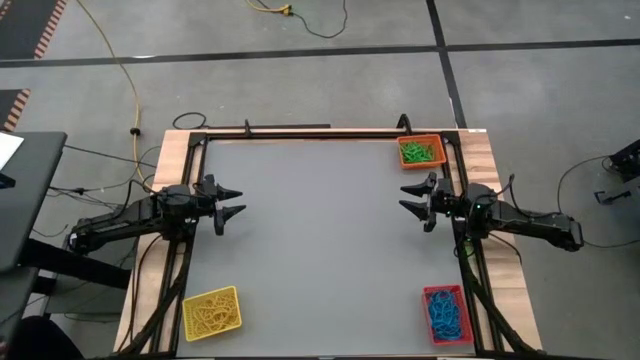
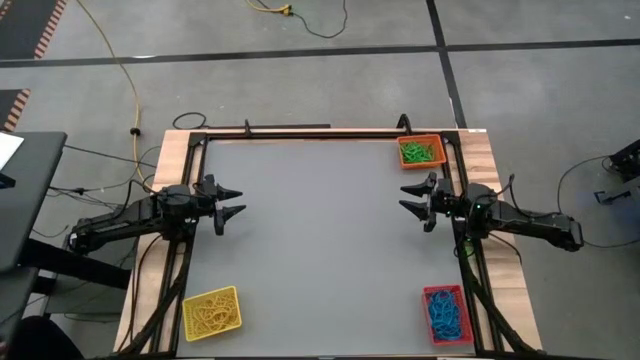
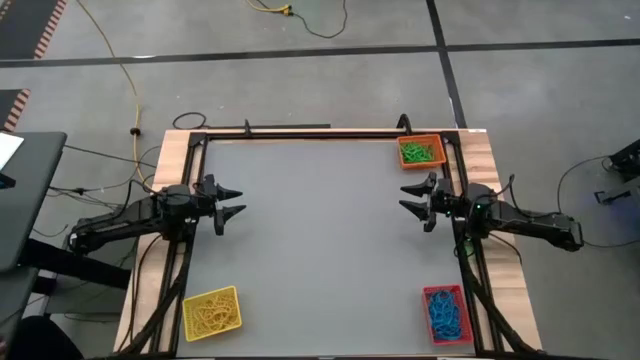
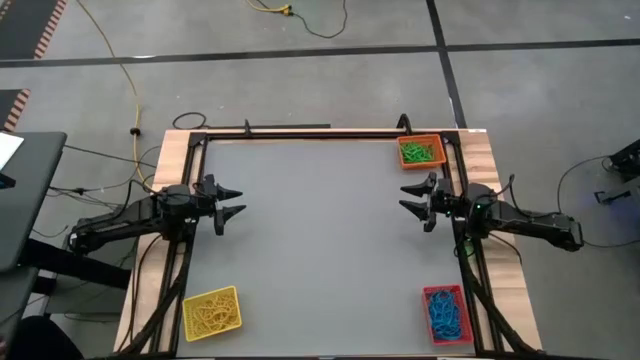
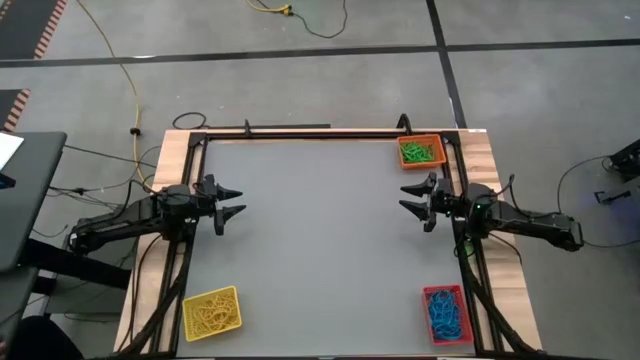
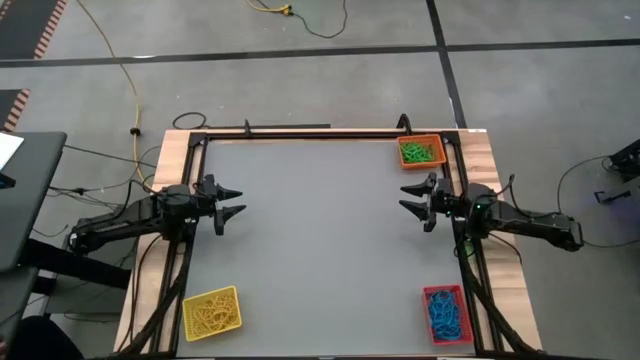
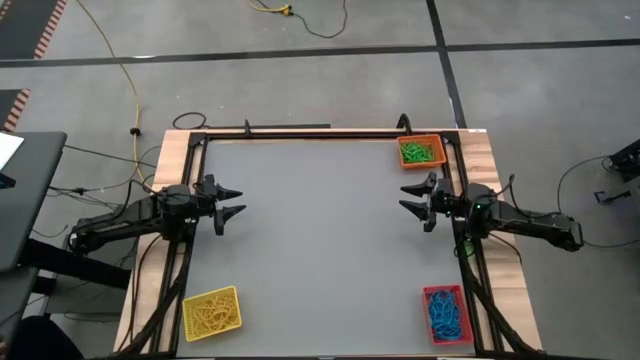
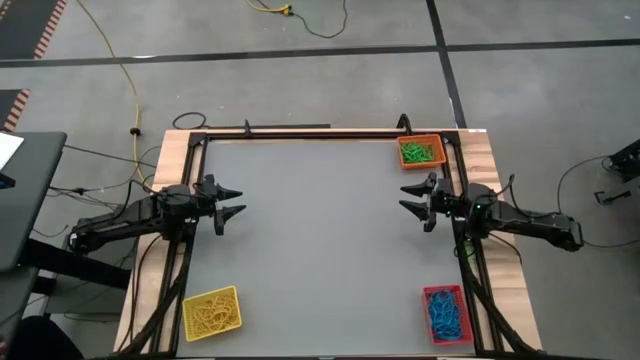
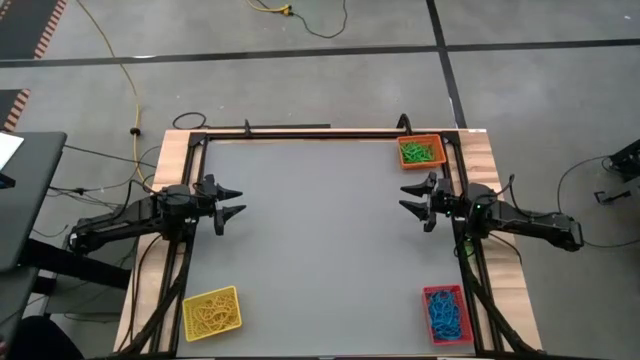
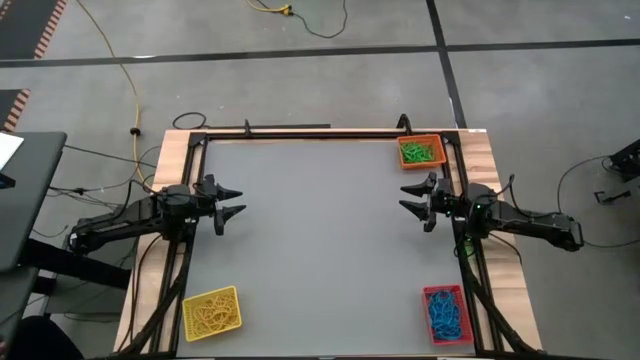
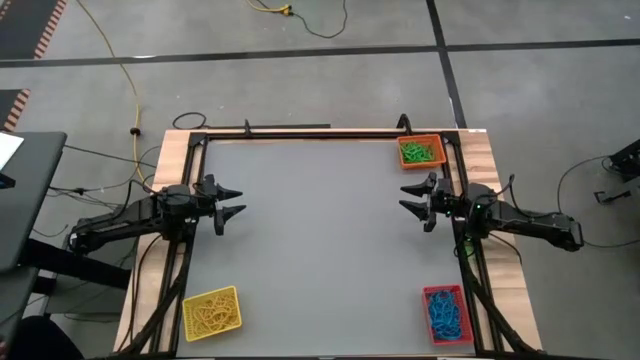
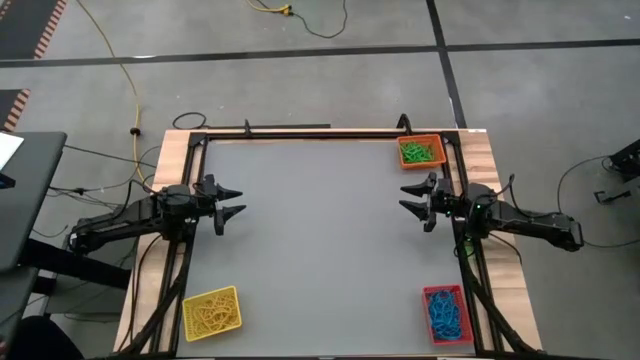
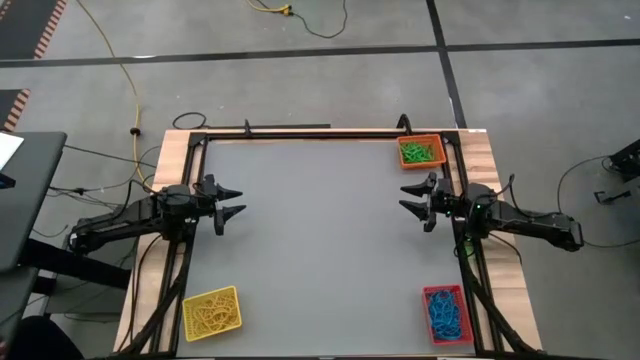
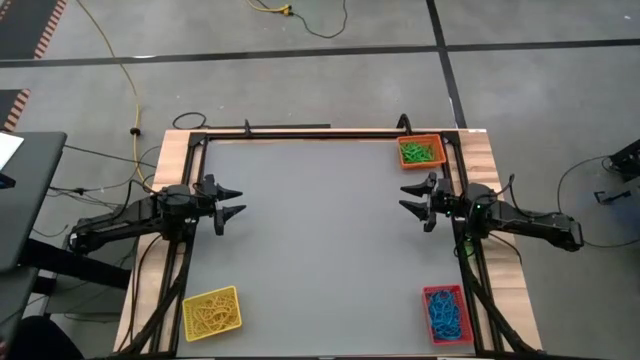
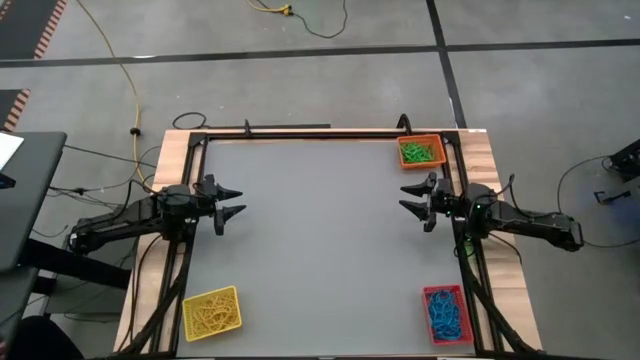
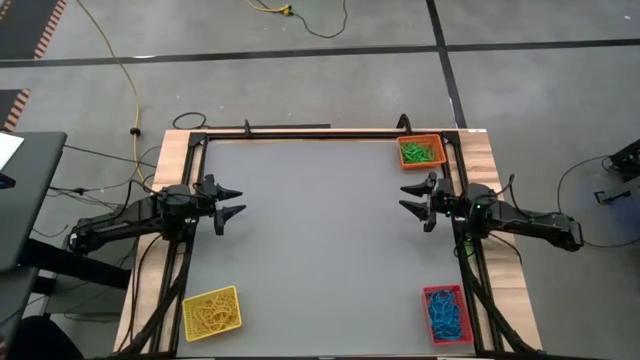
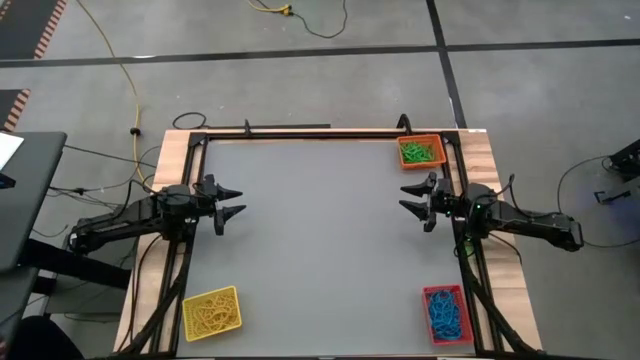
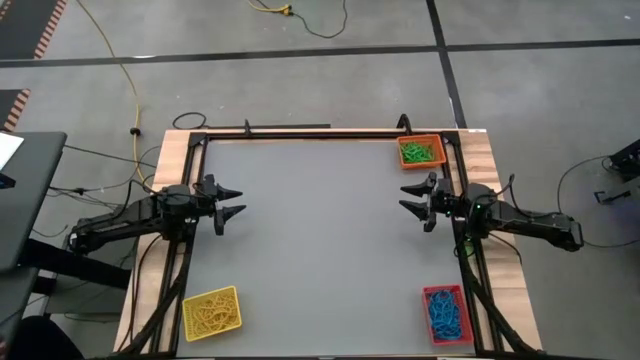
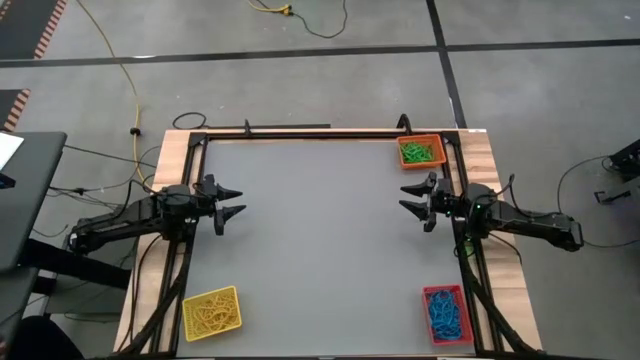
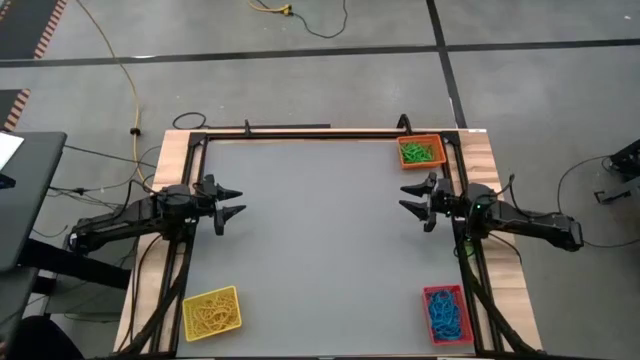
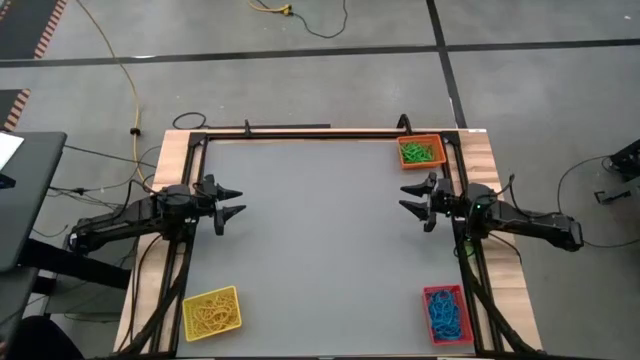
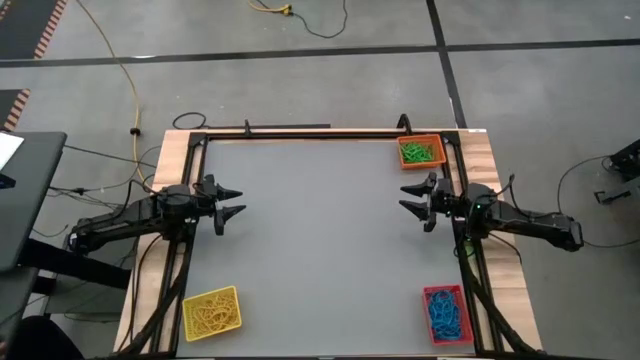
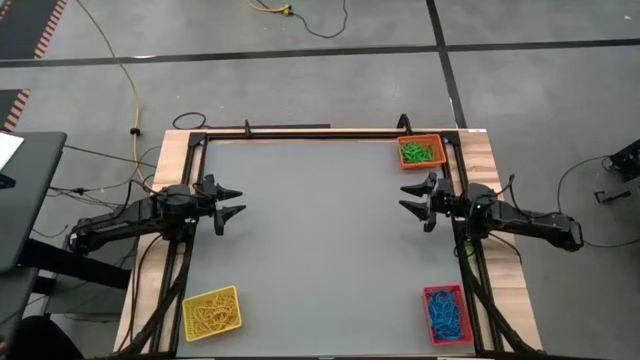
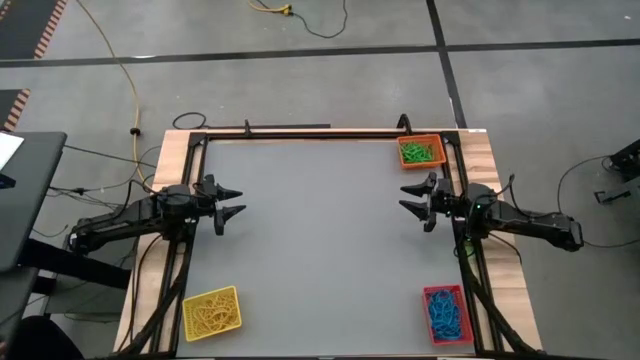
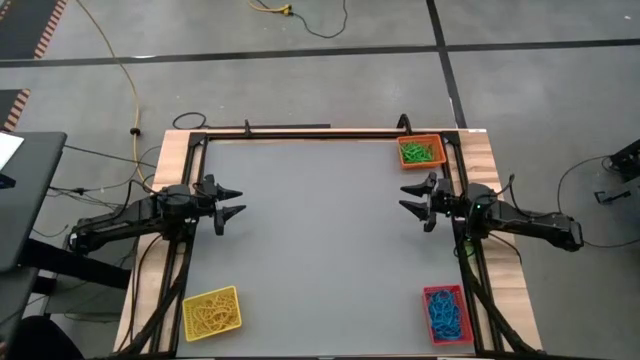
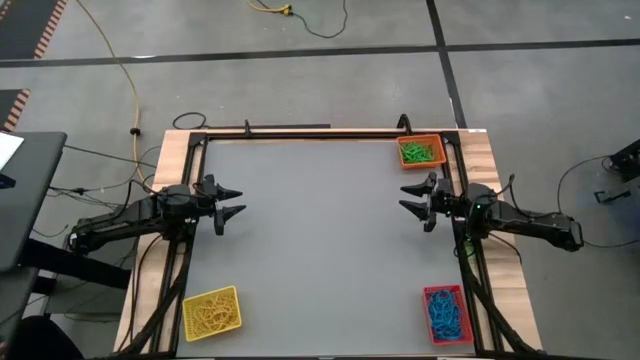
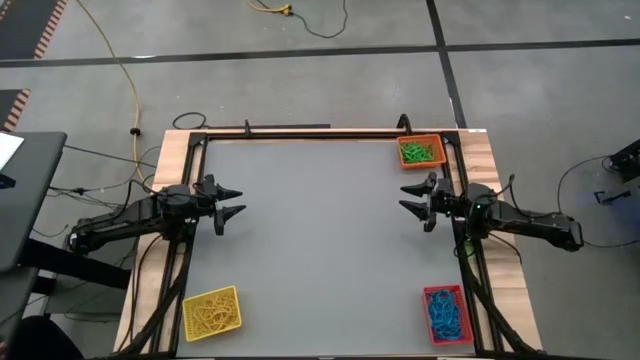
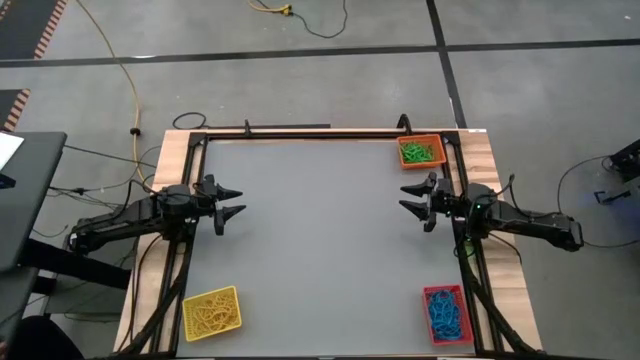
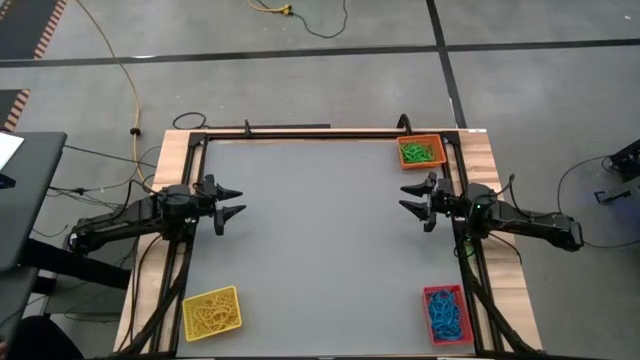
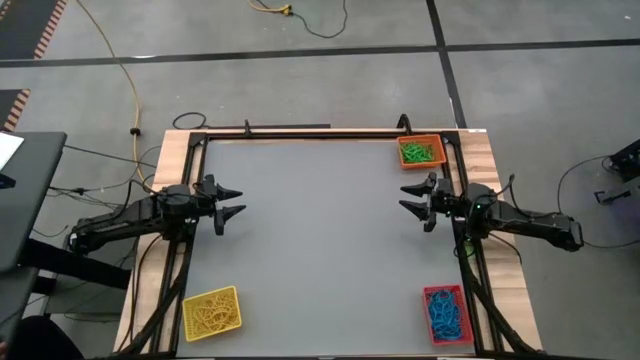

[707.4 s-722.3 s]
Task: Sort rubber bands into baskets
Return to Home Position

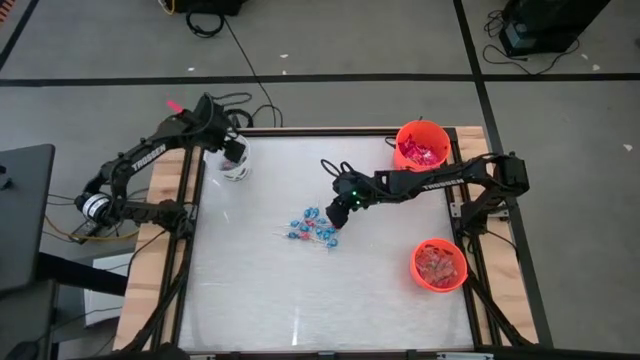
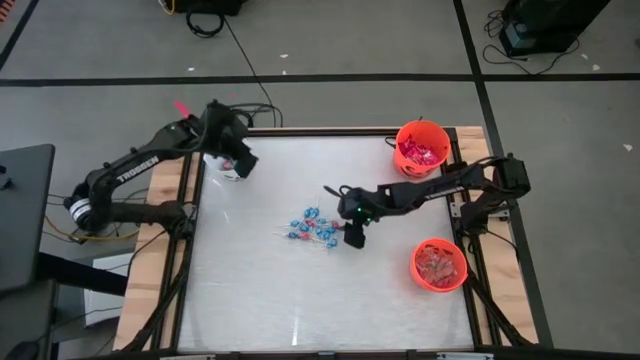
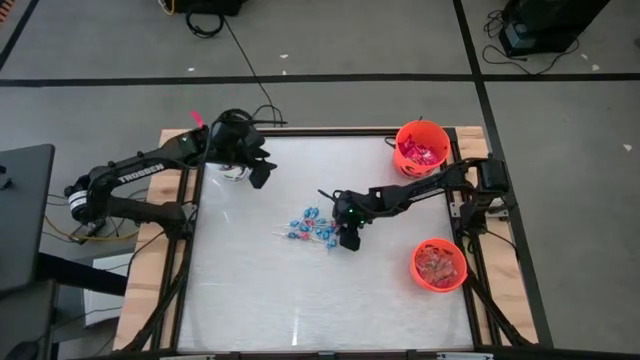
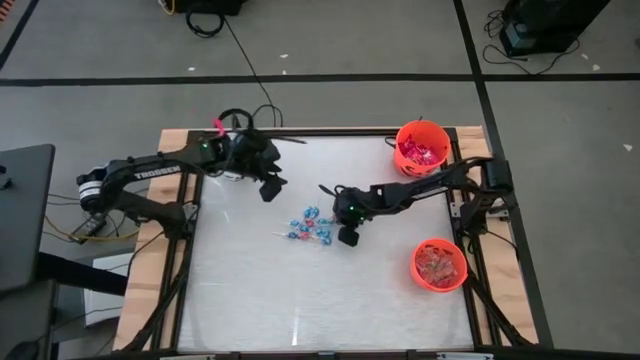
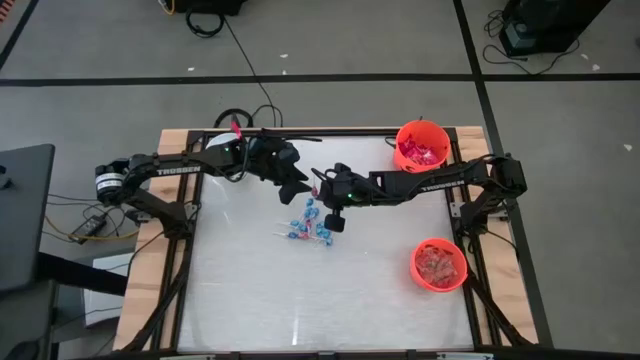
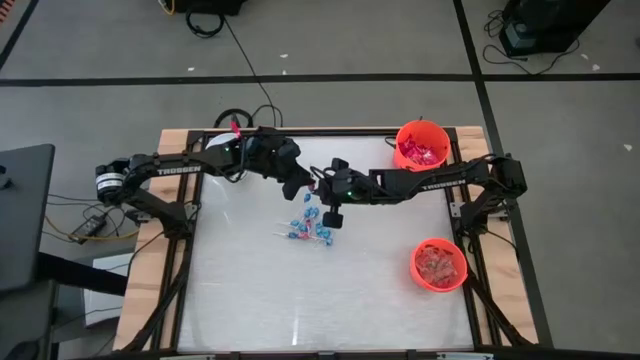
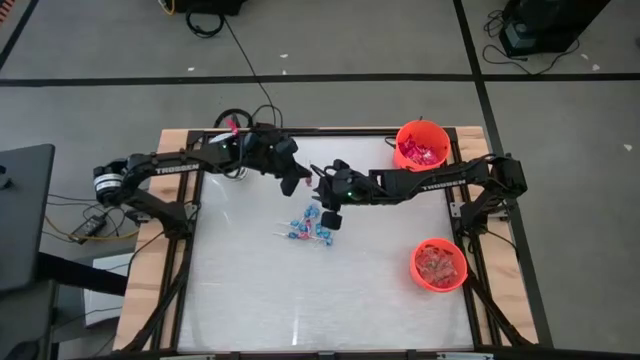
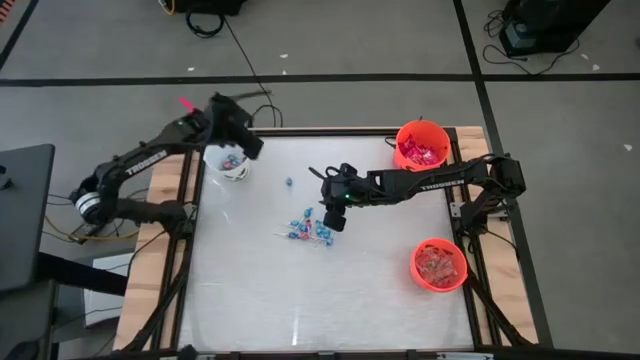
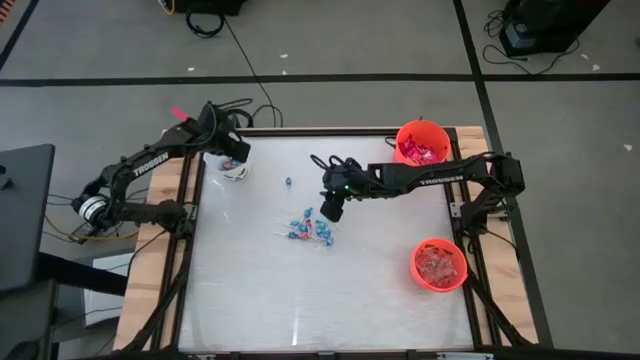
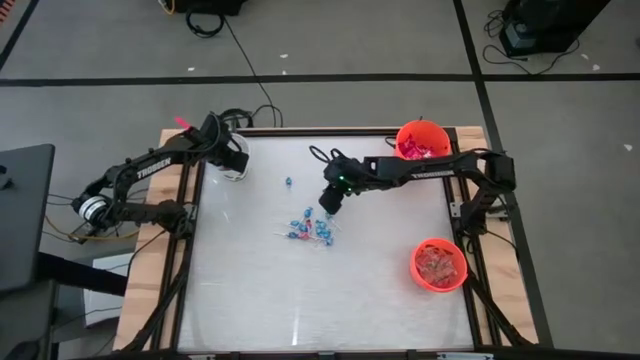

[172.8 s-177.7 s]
Task: Sort candy by brand, put in halloween buckets
Put the red candy into the white bucket

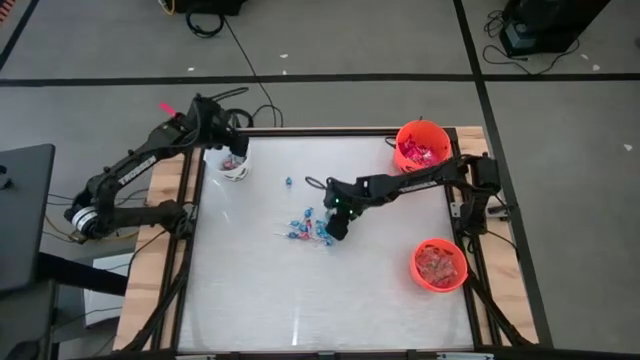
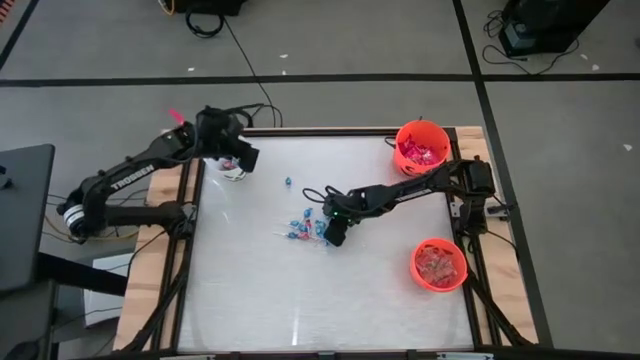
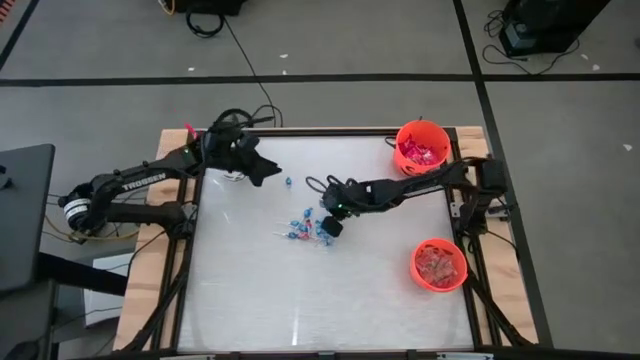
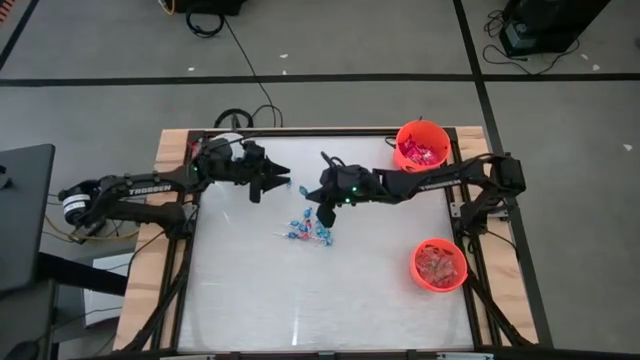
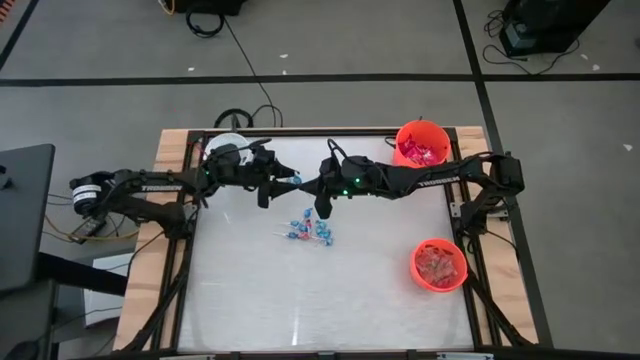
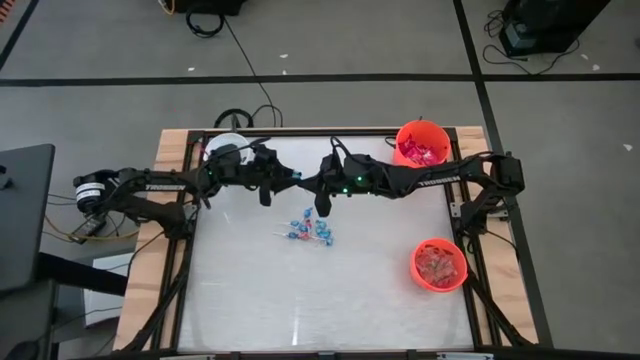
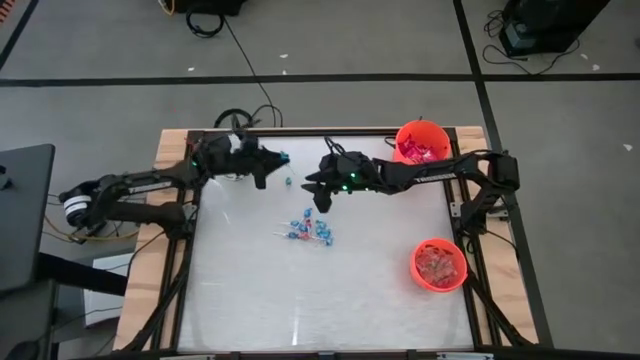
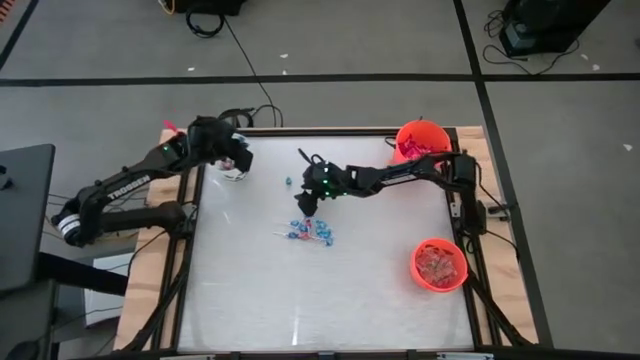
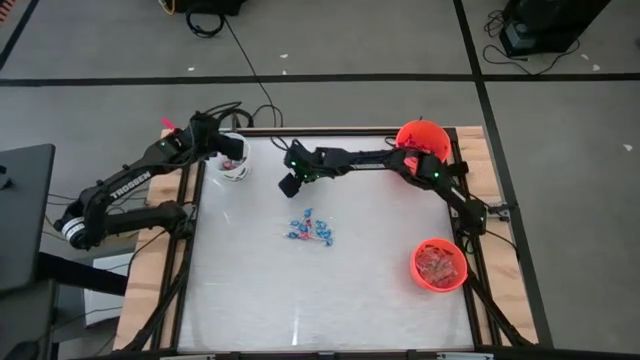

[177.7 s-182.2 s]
Put the blue candy into the white bucket
